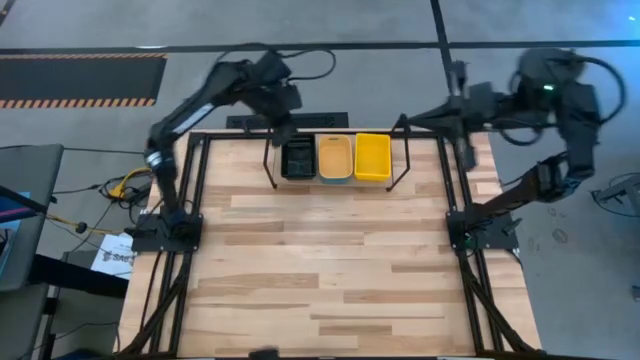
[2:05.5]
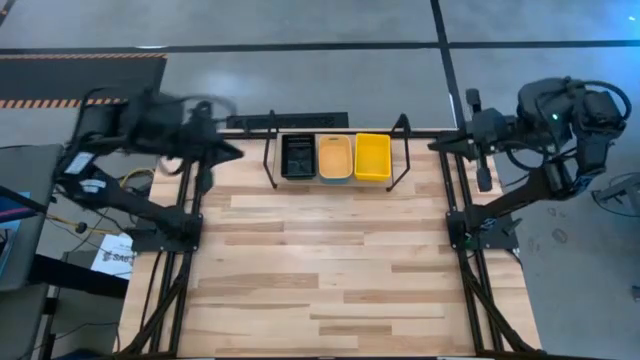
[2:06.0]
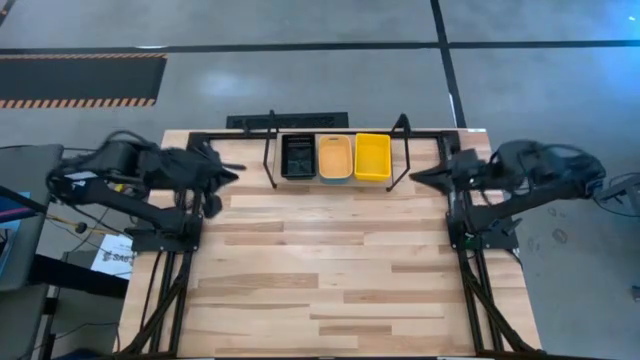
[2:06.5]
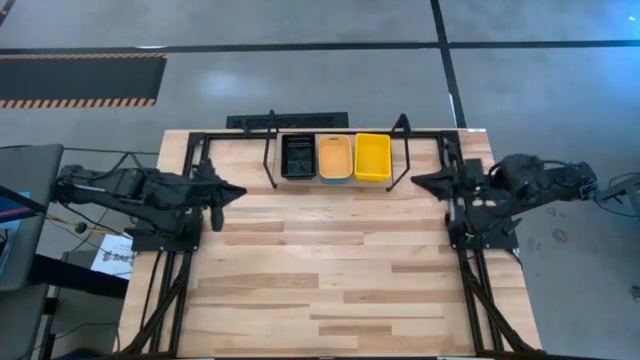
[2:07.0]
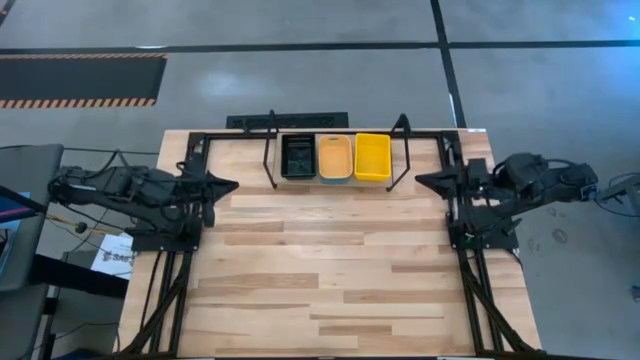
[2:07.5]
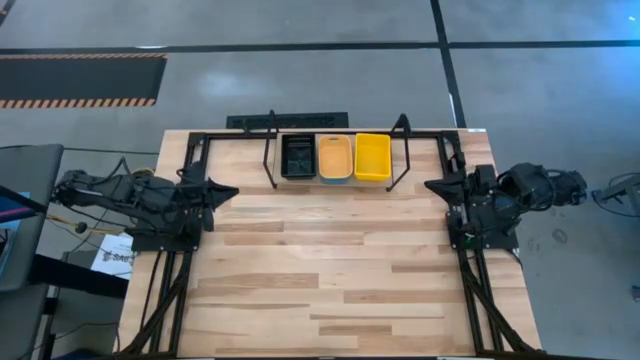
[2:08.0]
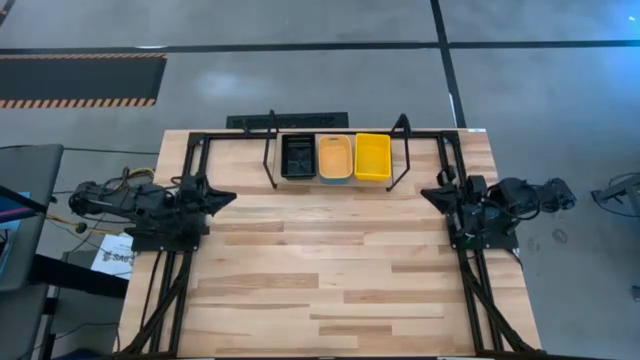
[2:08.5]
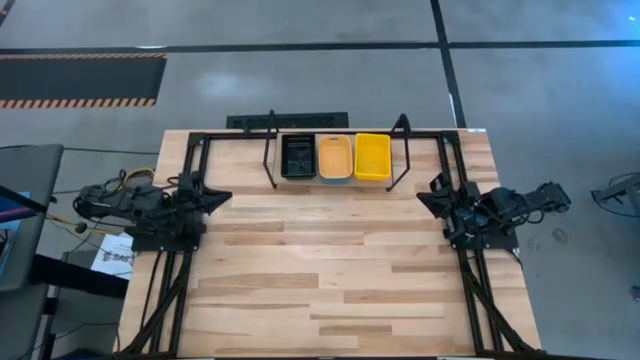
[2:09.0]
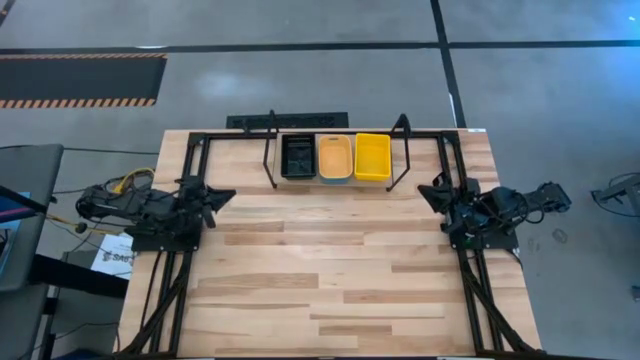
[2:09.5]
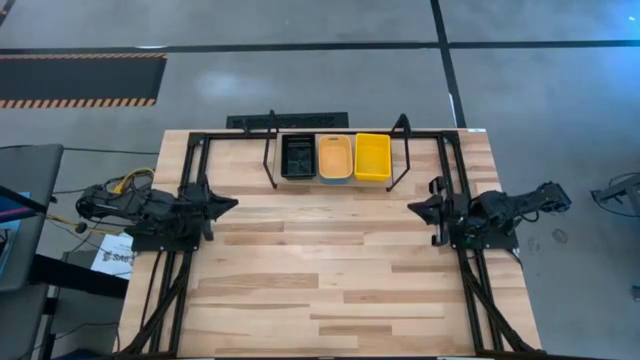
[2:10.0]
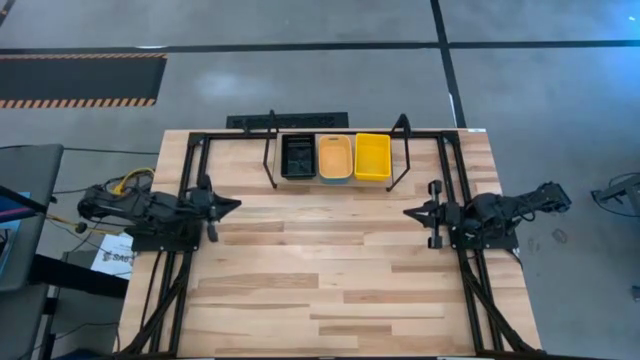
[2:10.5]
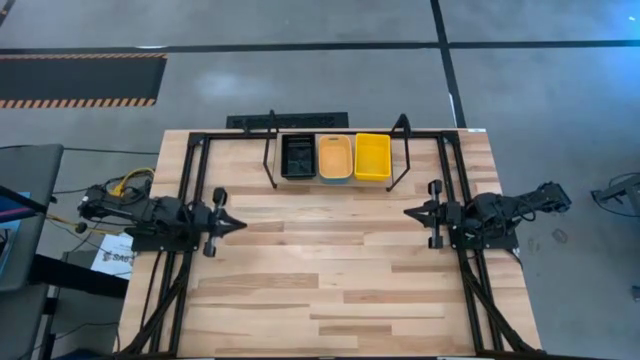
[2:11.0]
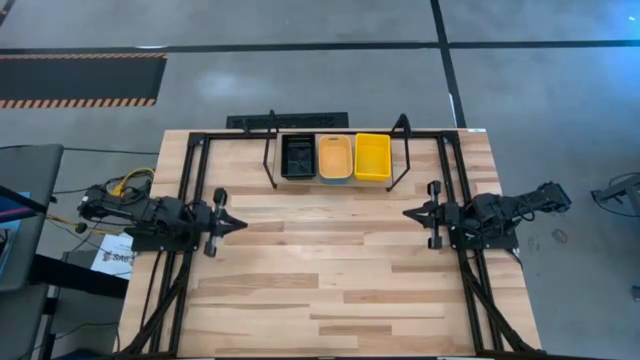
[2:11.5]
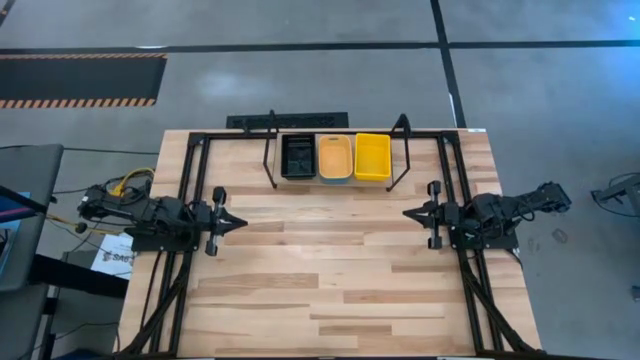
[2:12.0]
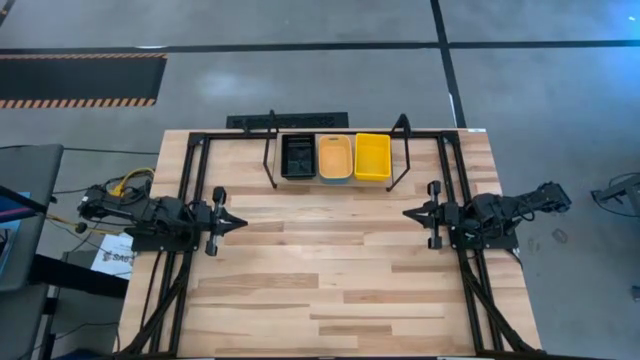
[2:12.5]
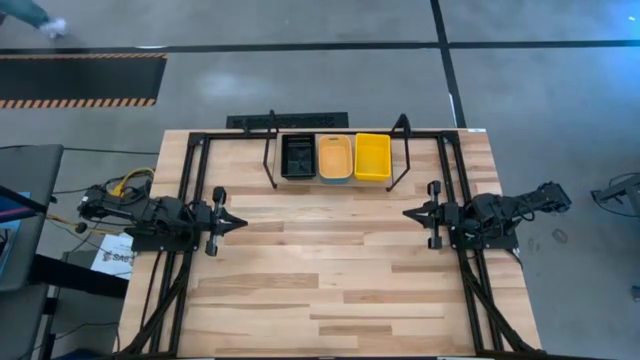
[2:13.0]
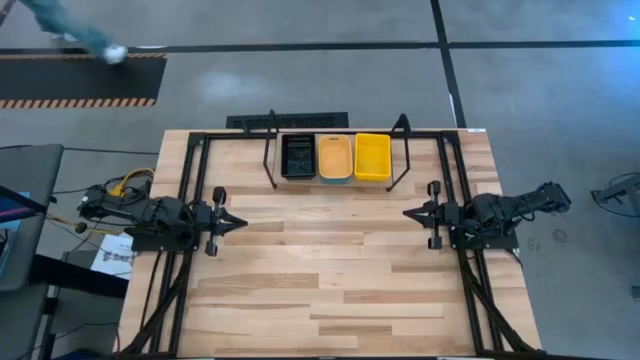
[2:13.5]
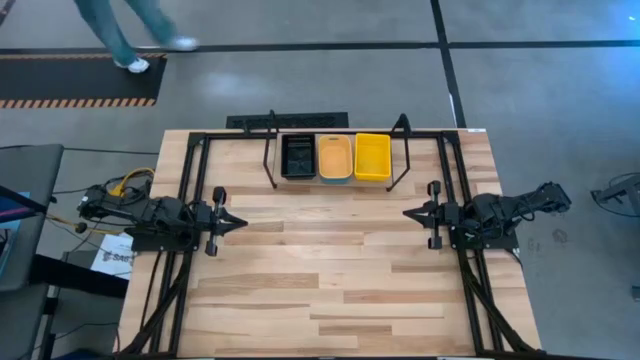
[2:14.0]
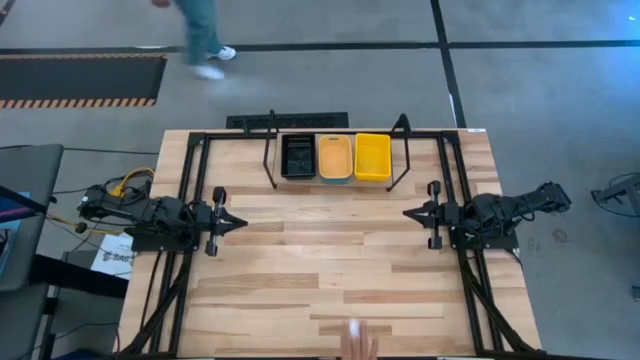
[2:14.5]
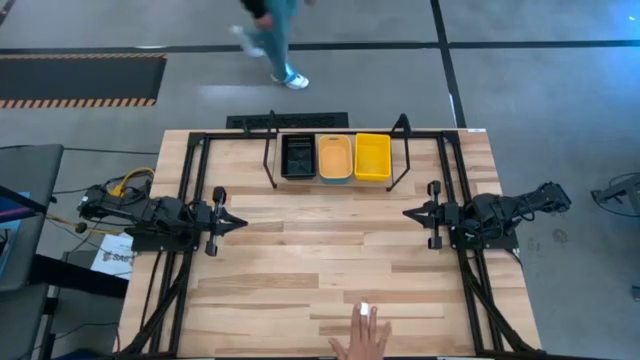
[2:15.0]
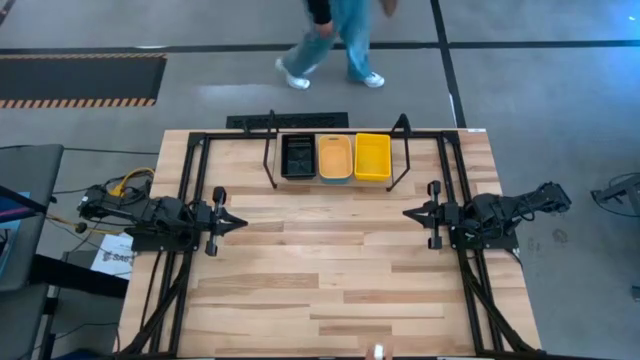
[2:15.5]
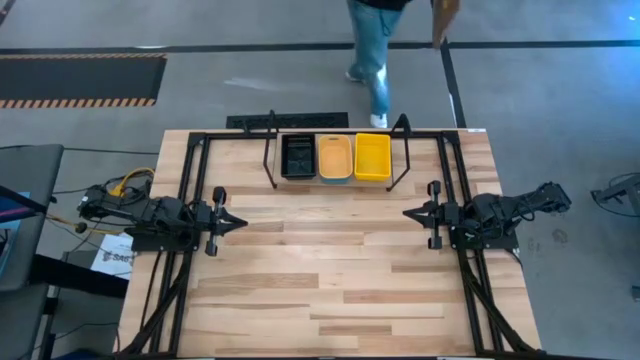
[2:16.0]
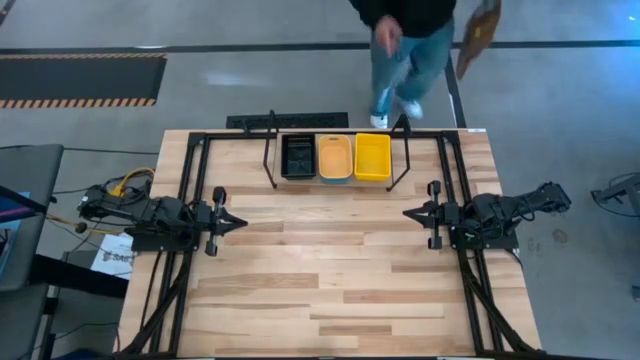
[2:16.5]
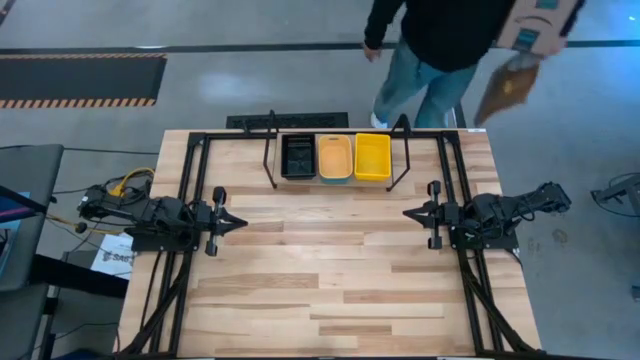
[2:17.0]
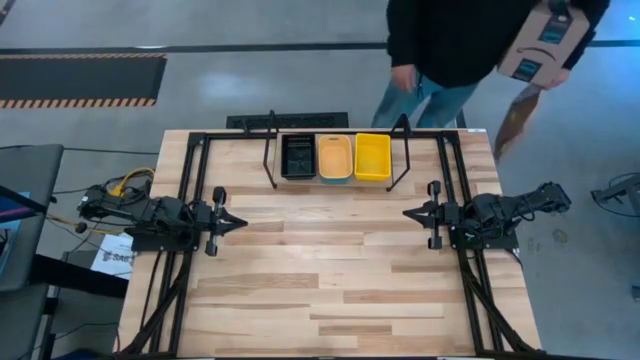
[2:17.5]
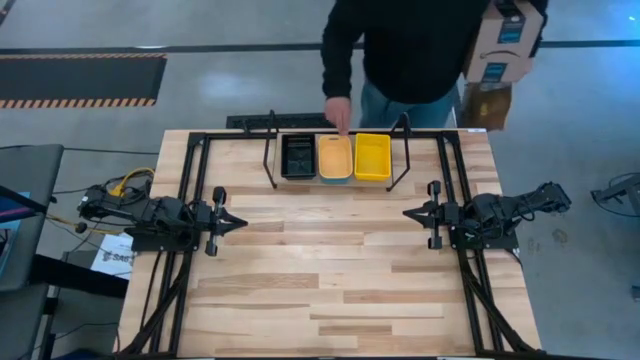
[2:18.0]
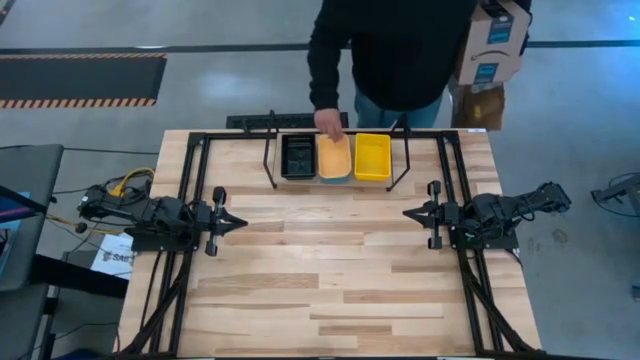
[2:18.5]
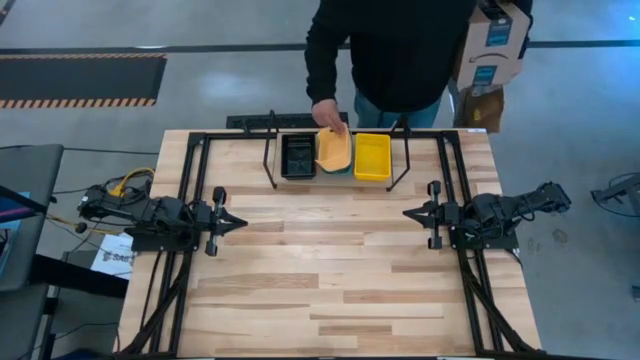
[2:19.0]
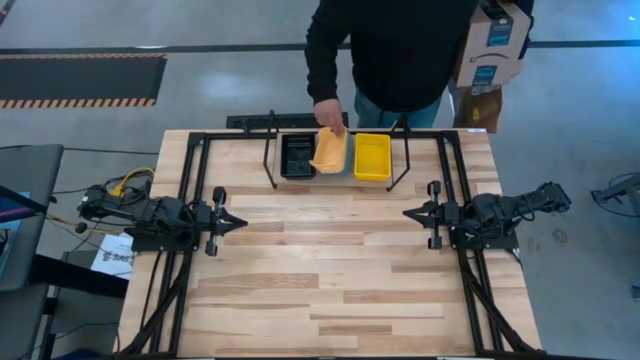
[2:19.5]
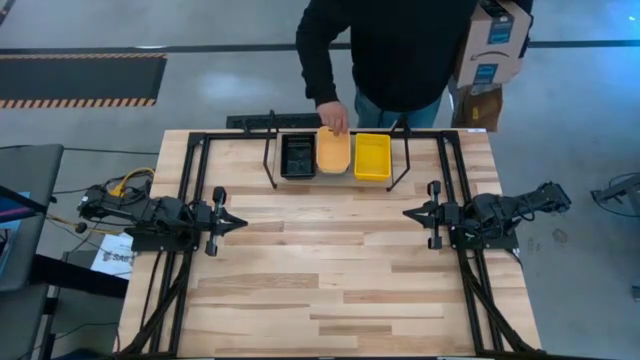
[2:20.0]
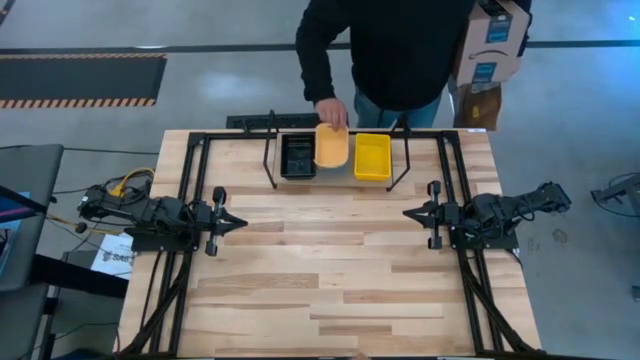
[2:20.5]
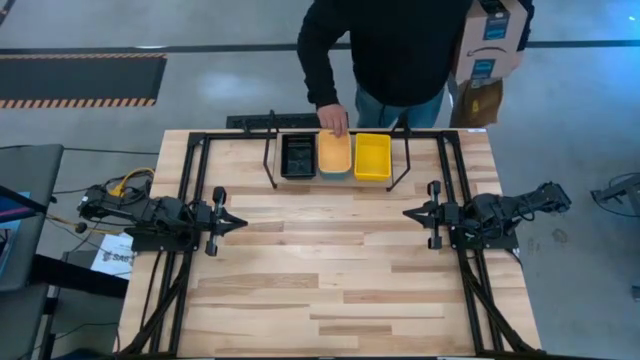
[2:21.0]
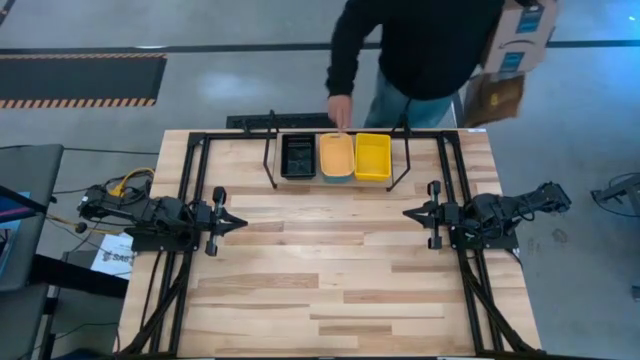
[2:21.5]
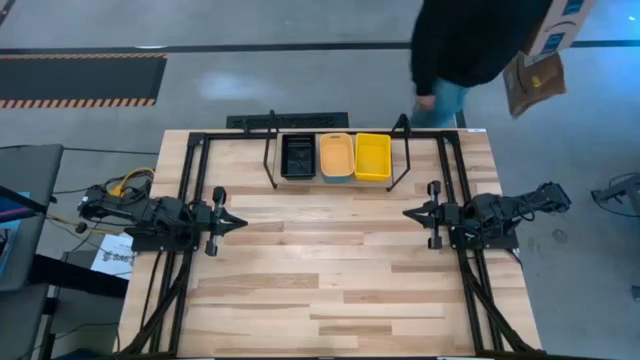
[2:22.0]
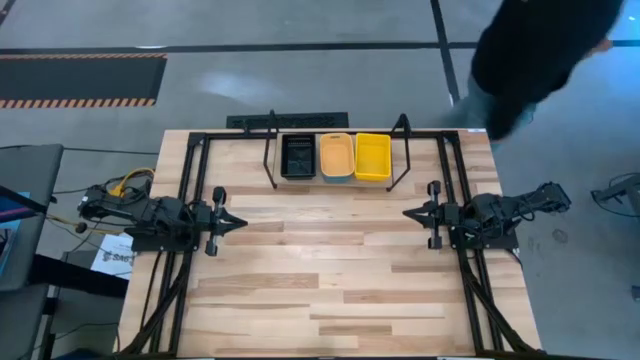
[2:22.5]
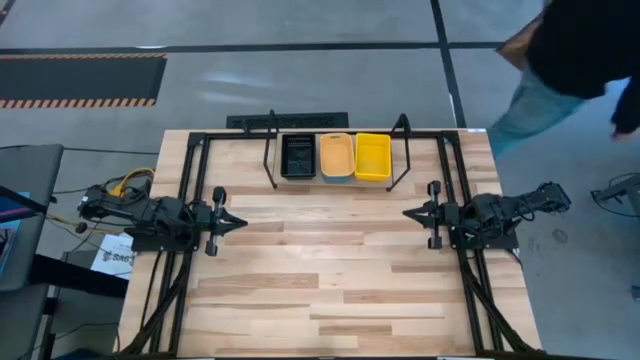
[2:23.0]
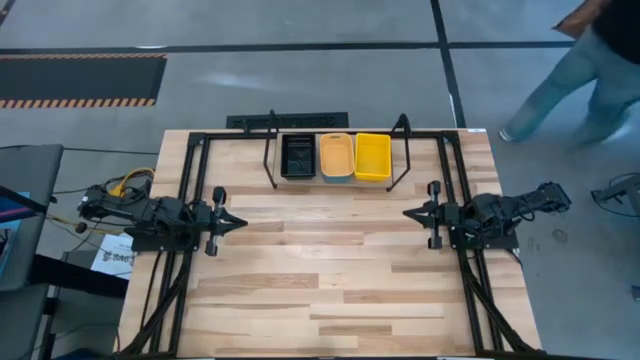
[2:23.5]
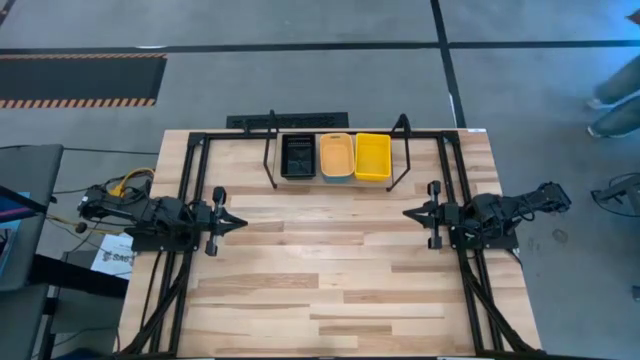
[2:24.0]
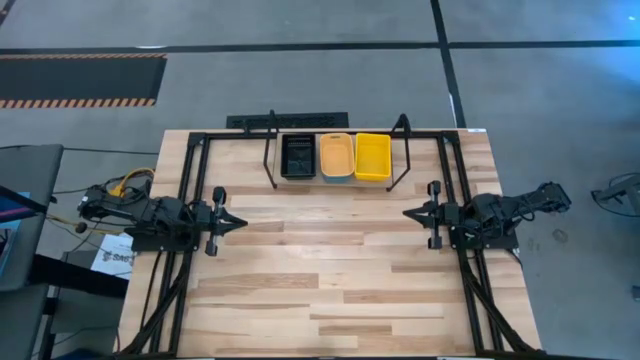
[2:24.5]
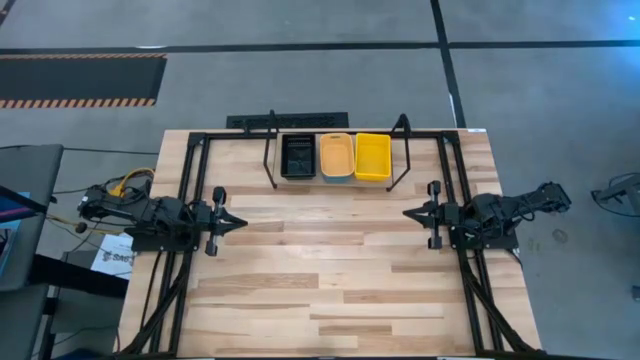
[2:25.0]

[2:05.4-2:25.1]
Task: Stack baskets on shelf by color
Return to Home Position

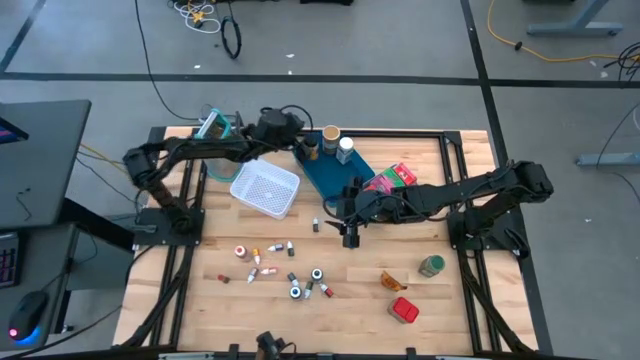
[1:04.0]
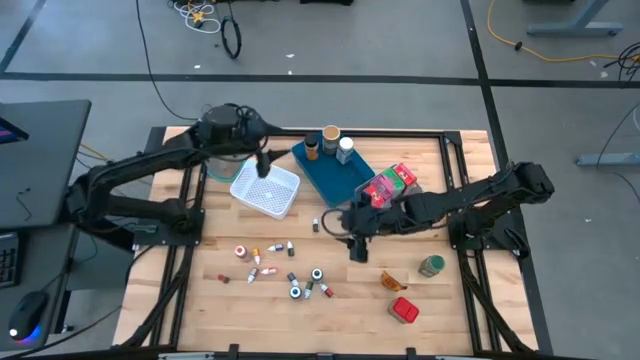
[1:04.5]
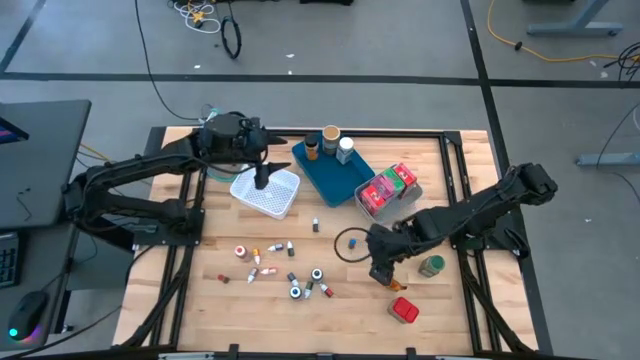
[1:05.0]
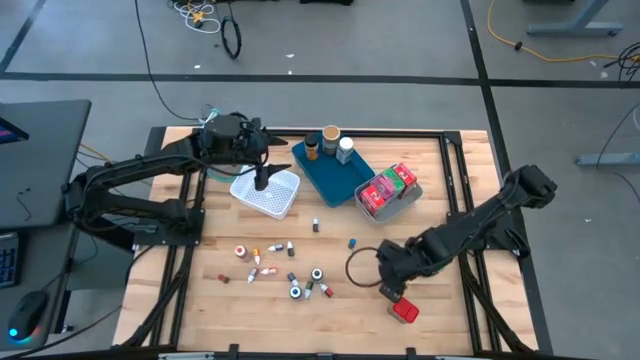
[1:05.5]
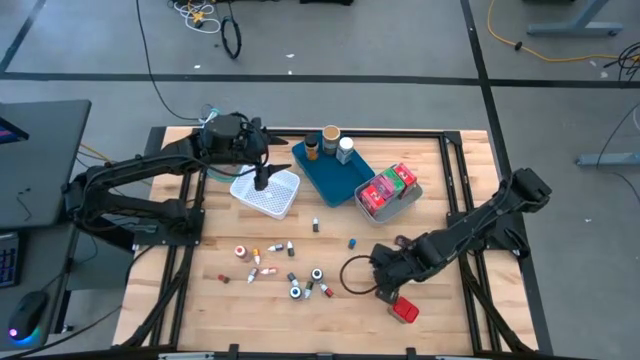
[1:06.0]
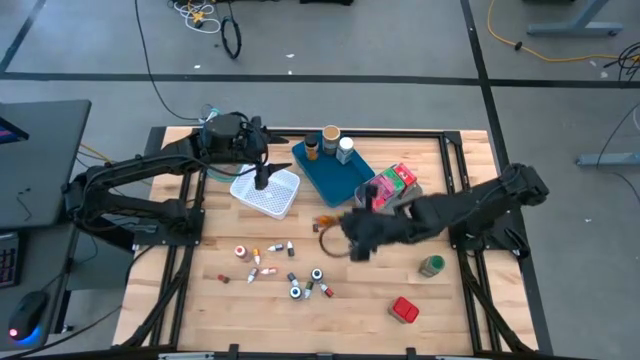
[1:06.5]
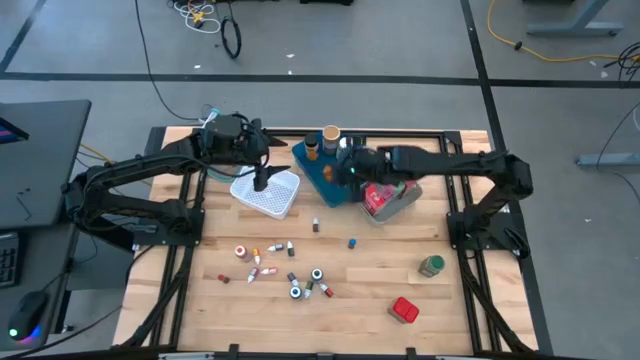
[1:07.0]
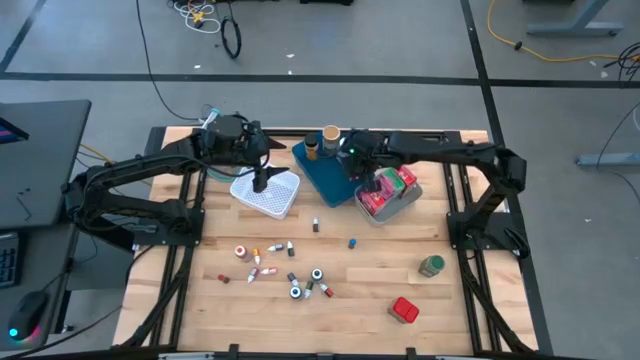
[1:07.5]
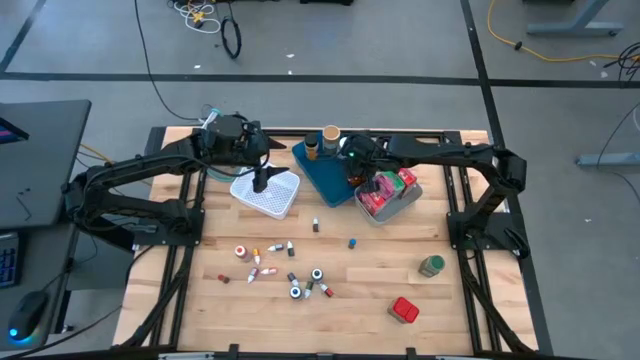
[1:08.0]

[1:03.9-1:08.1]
Task: Pick & Place Kitchen Items
Put the orange seasoning pack into the blue bin
